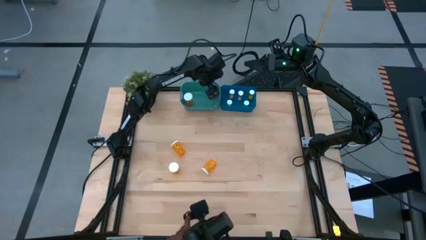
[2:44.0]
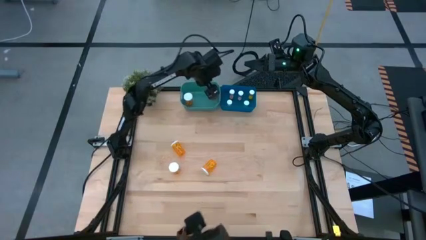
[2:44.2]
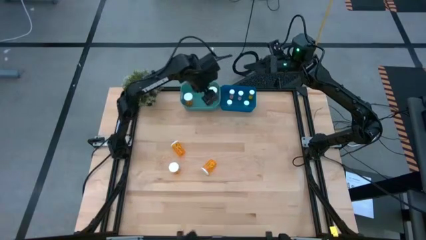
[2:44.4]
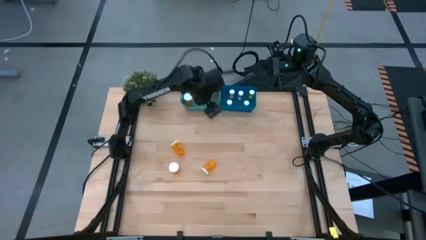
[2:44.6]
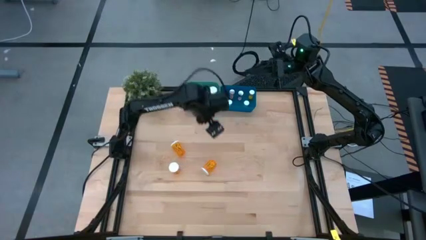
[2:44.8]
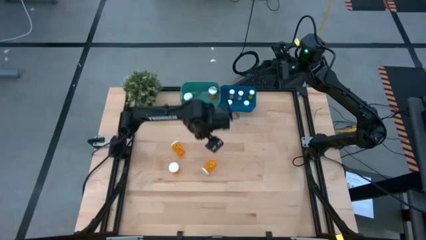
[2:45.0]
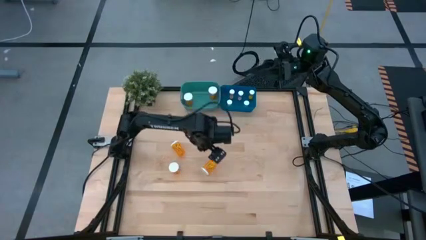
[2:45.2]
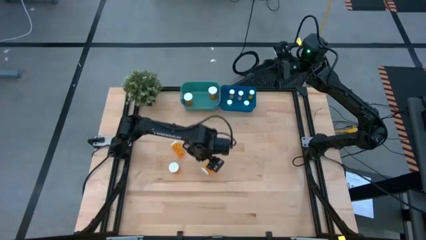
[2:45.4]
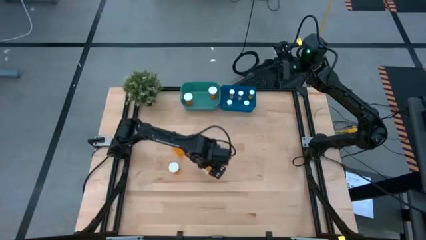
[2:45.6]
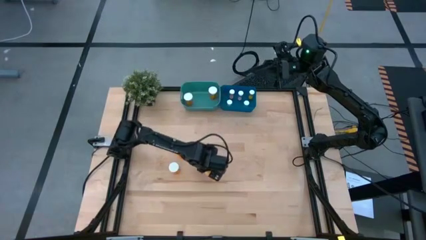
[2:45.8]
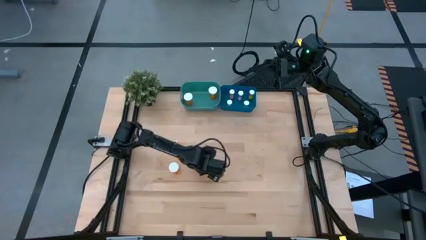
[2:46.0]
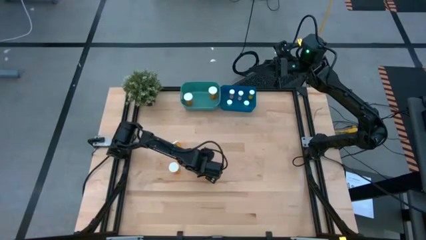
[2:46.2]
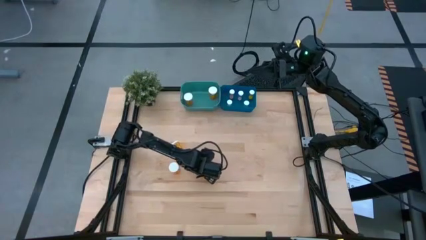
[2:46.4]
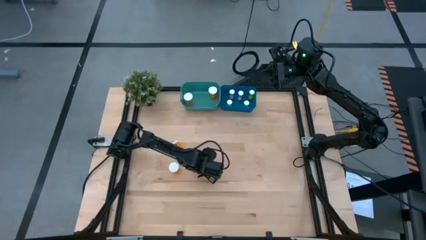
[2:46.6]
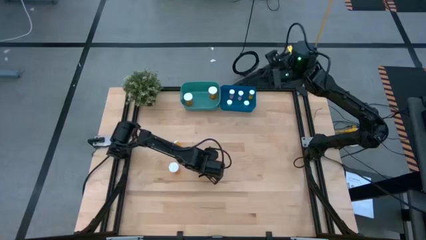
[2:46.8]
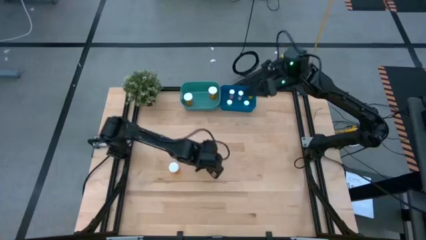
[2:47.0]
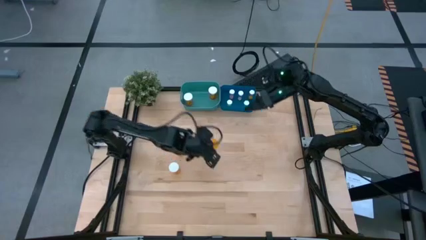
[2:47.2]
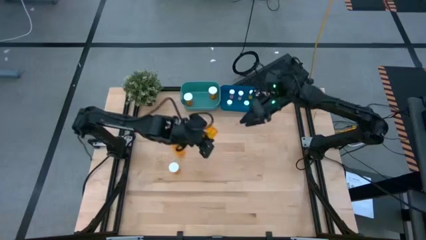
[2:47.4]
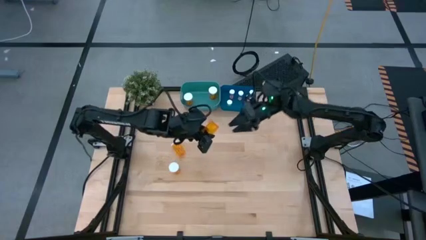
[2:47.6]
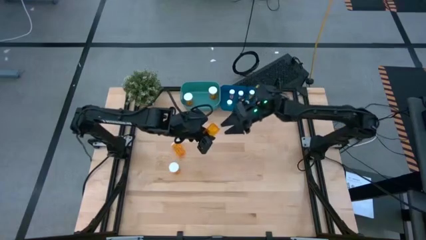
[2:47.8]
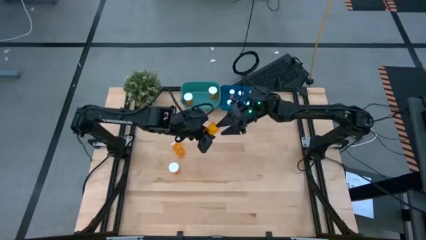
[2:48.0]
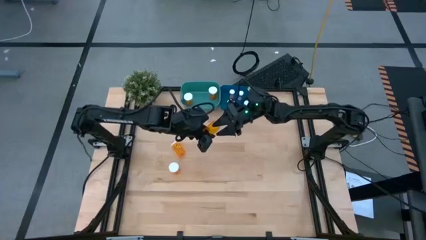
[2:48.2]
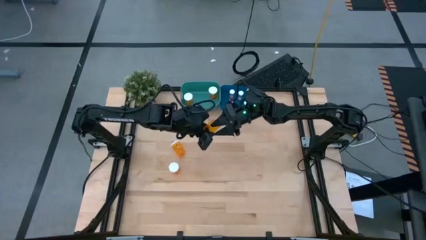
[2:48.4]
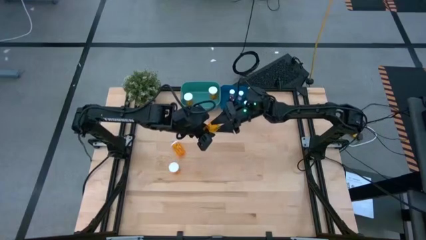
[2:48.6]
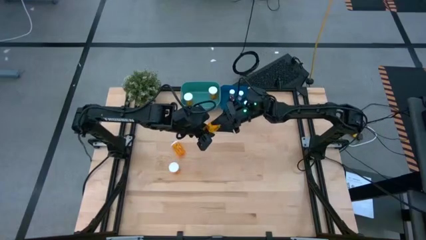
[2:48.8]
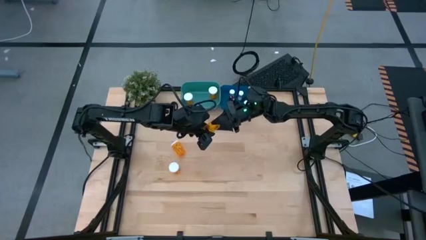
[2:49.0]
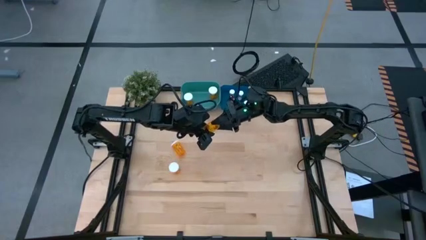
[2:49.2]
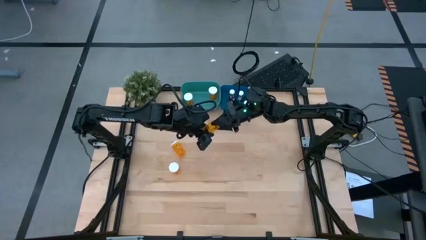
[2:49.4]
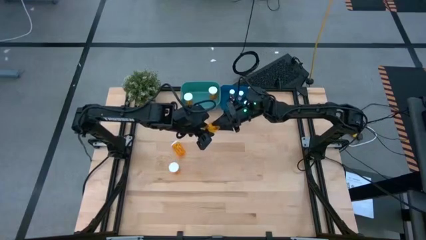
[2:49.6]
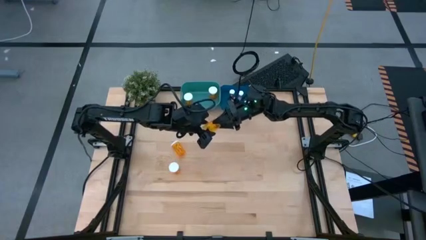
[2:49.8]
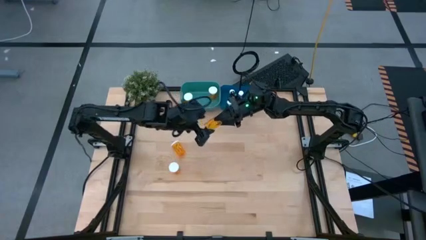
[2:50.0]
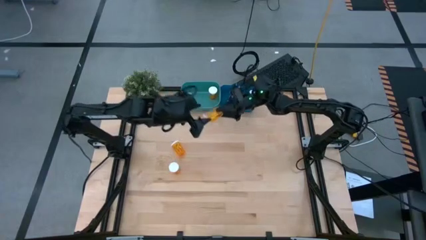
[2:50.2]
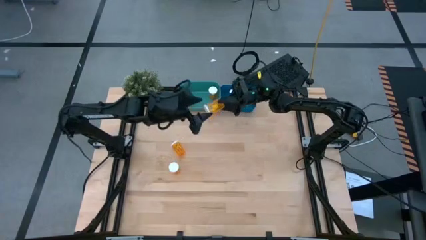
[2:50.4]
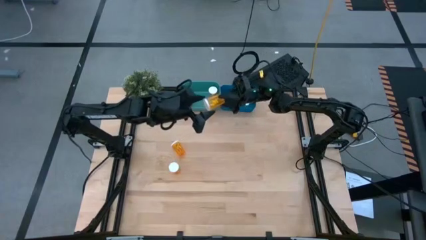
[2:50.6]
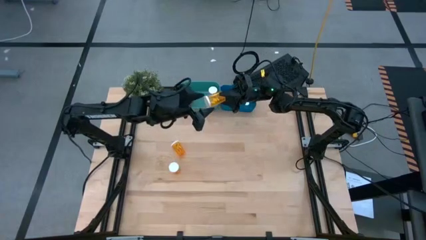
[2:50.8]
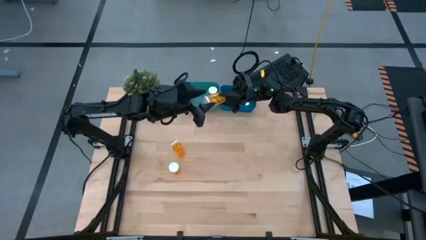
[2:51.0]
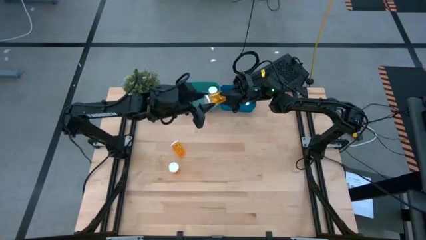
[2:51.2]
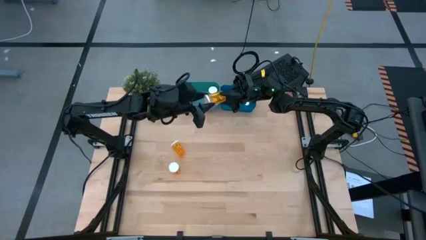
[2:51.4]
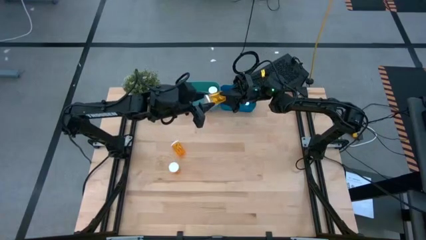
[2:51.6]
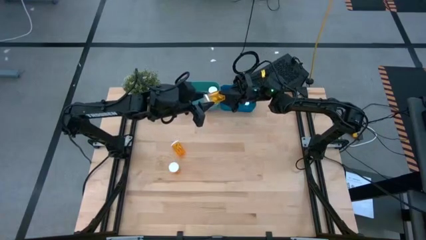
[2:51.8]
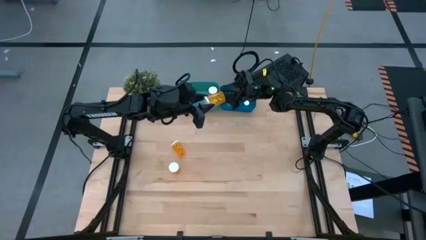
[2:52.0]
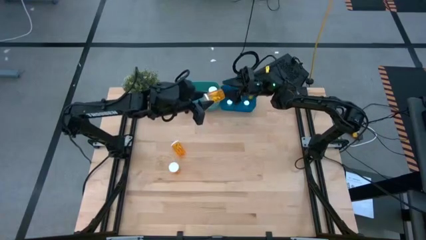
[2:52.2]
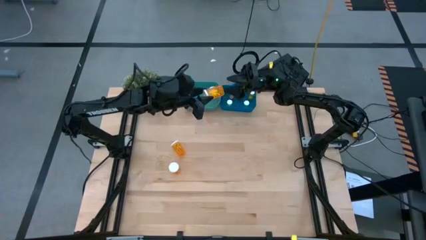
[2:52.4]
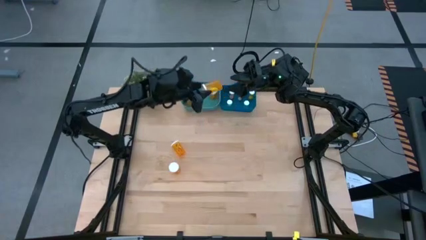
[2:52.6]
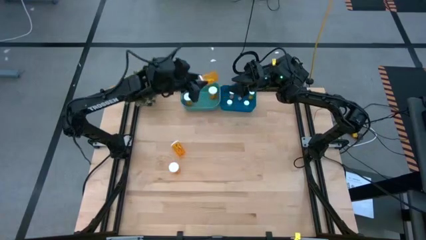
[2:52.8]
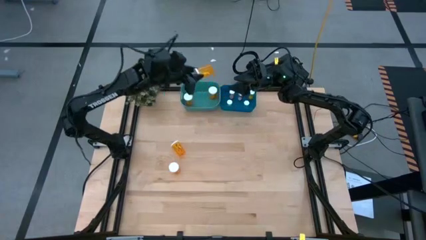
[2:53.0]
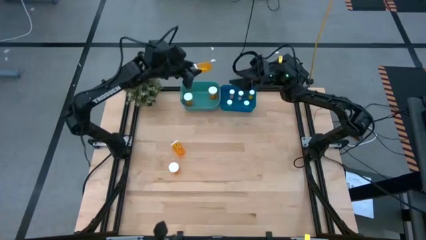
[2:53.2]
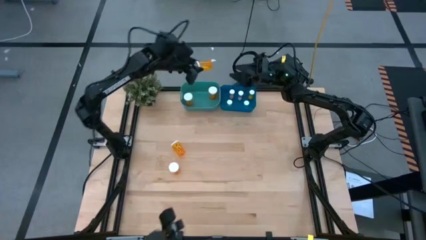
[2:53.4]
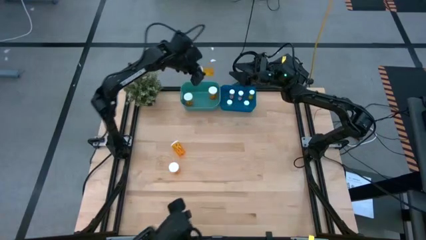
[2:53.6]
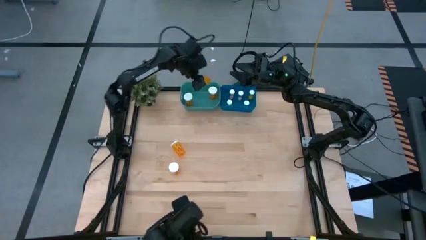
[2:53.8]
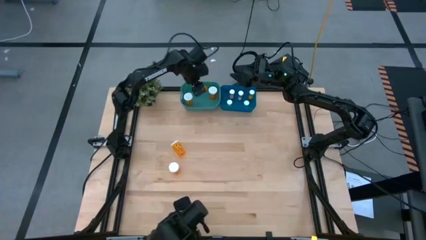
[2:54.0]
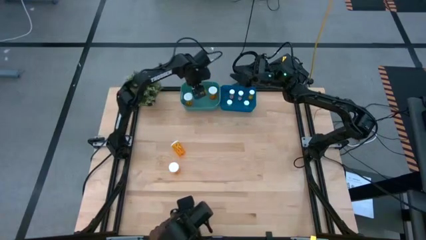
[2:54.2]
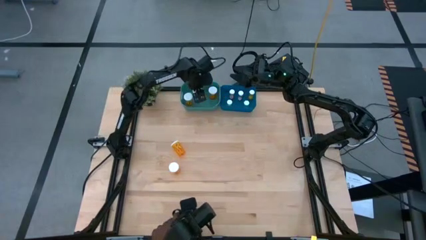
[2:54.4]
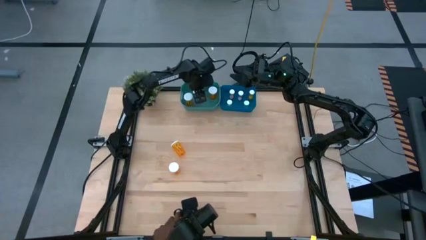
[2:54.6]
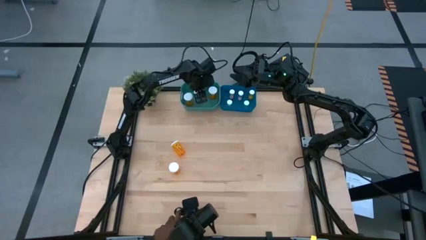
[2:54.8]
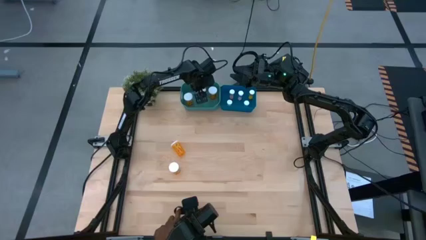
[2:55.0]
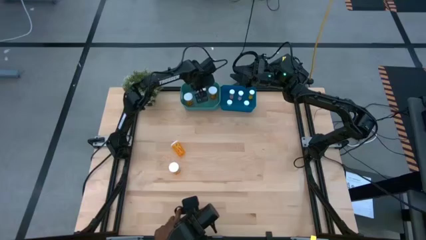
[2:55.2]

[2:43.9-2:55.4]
Task: Pick and place medicine bottles into bin by pill shape (circle, oval)
Put the large orange capsule bottle into the green bin

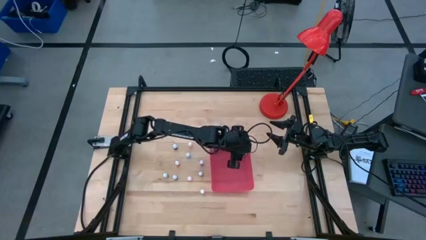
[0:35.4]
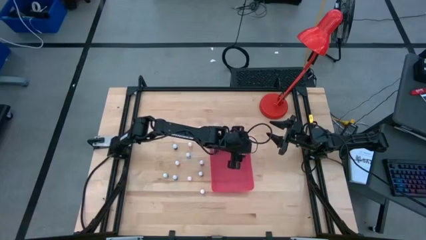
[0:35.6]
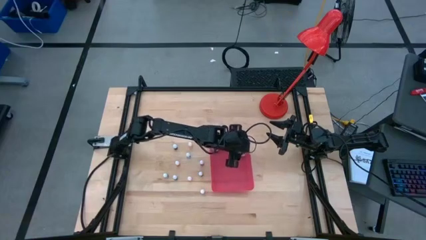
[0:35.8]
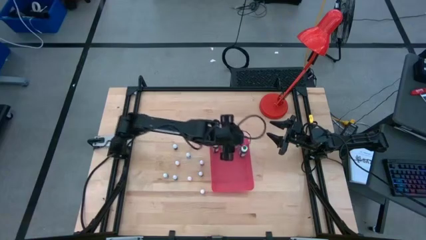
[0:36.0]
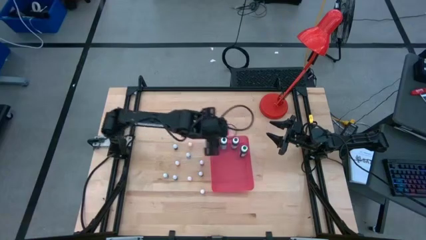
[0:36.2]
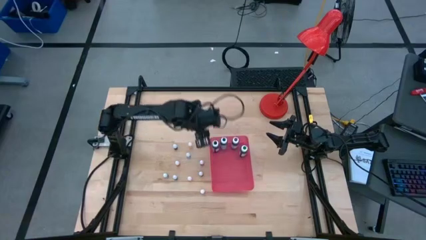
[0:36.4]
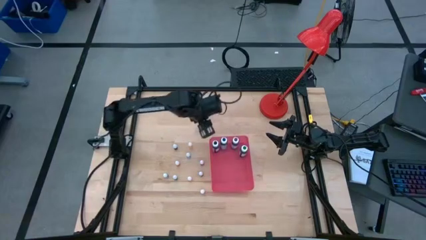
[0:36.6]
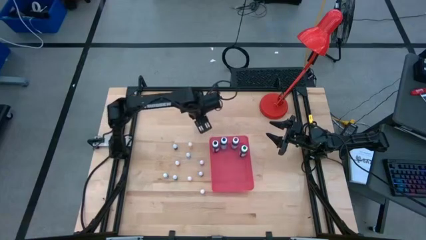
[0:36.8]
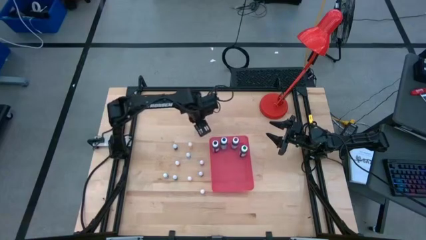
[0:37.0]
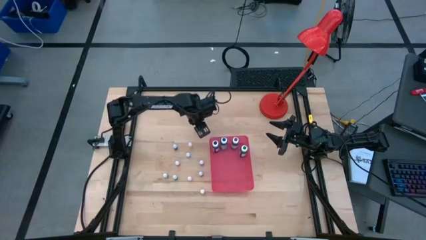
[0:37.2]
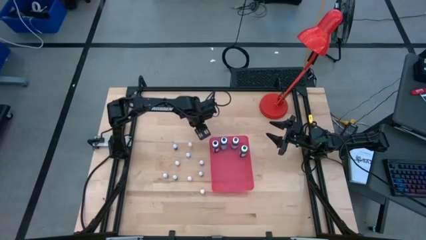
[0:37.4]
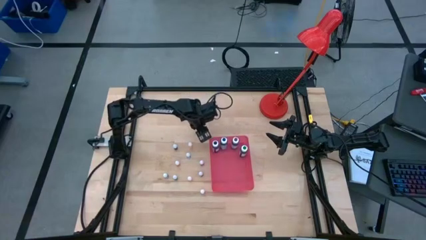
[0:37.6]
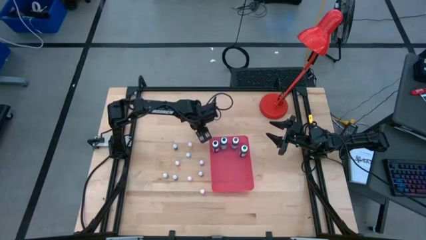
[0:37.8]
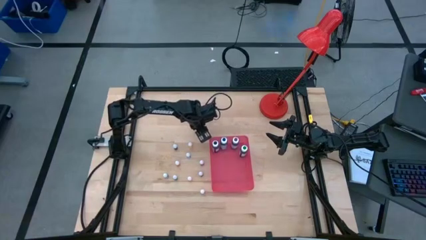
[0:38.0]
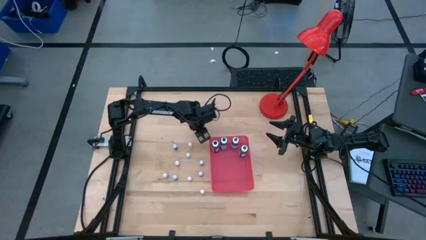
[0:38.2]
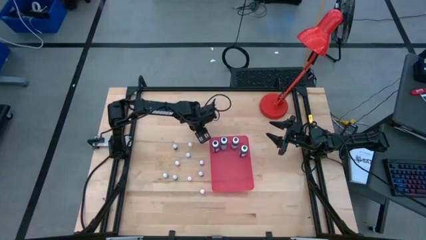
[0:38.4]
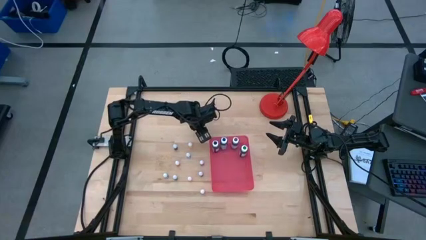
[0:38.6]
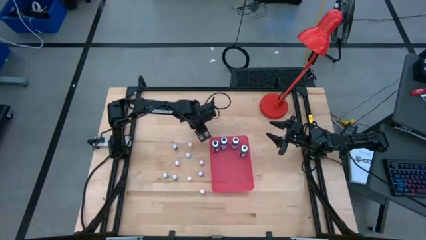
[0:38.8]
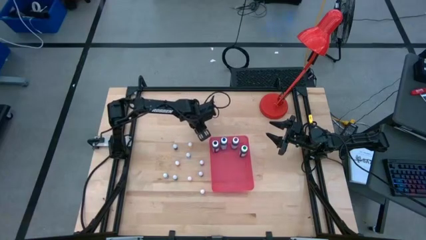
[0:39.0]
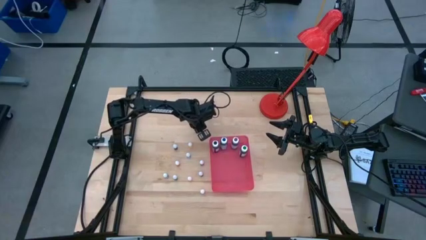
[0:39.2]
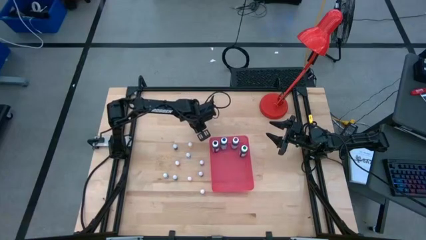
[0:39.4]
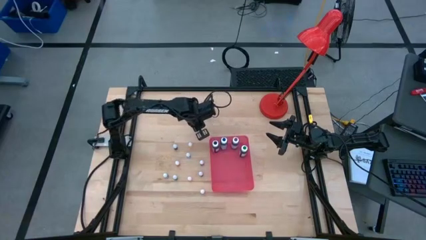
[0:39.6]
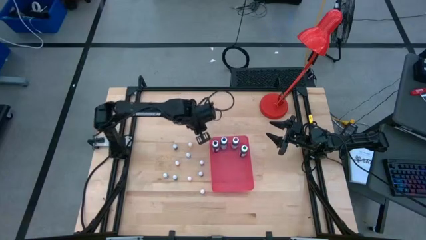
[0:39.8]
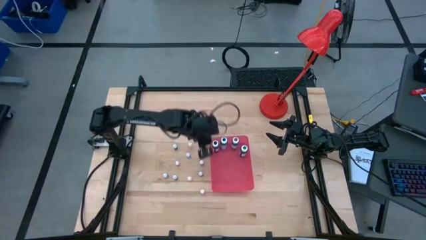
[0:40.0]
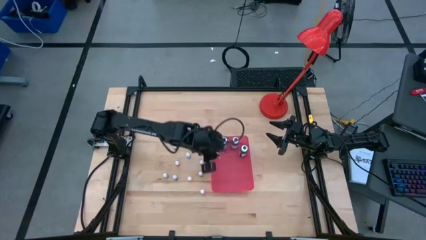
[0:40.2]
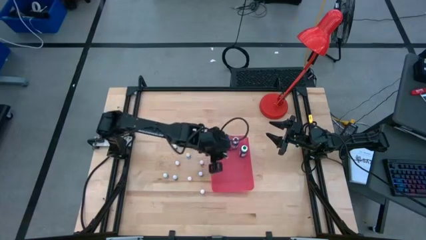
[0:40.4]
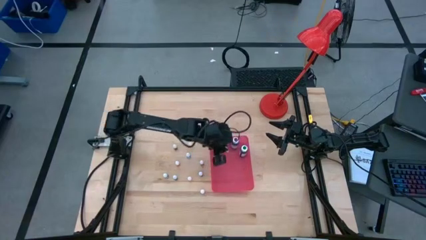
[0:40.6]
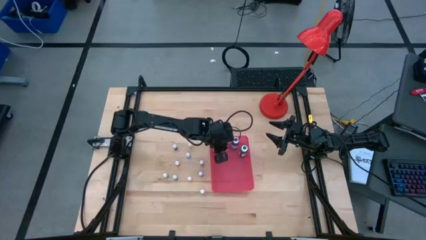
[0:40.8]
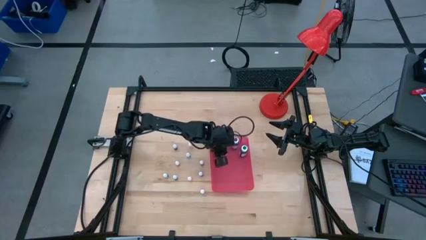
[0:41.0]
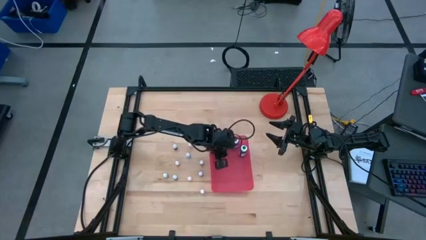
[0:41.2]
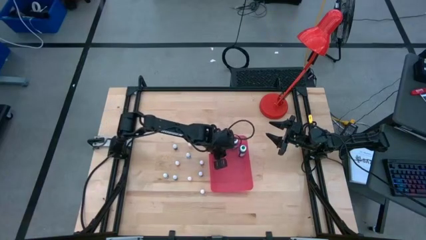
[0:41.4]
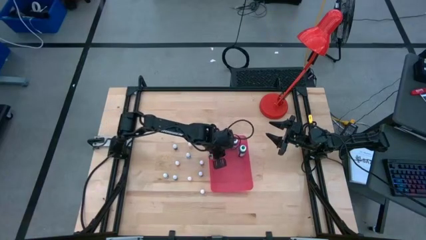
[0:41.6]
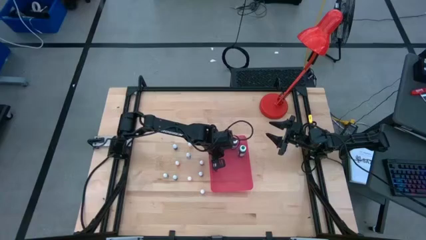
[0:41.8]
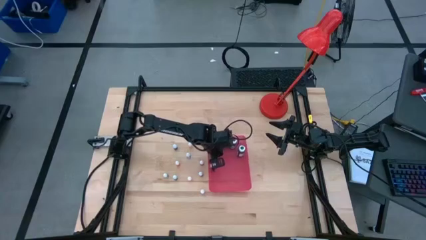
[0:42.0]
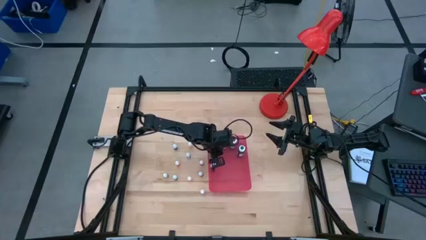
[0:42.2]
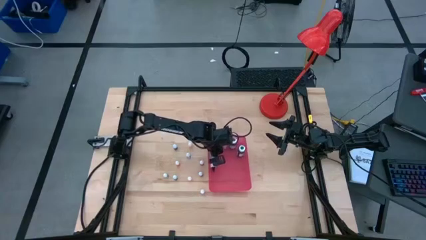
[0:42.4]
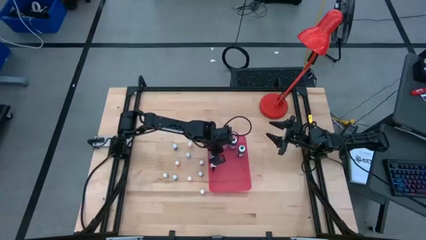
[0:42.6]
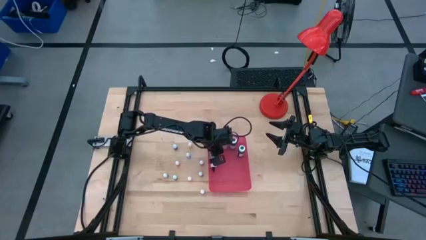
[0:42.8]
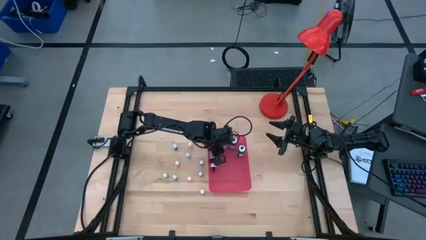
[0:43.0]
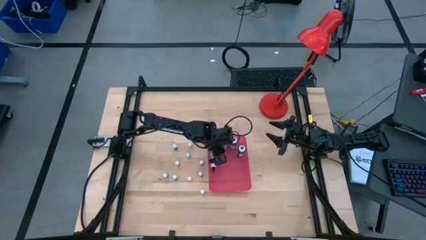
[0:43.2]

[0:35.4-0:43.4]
Task: Pick & Place food coloring
Put the small red food coloring bottle into the red bin
